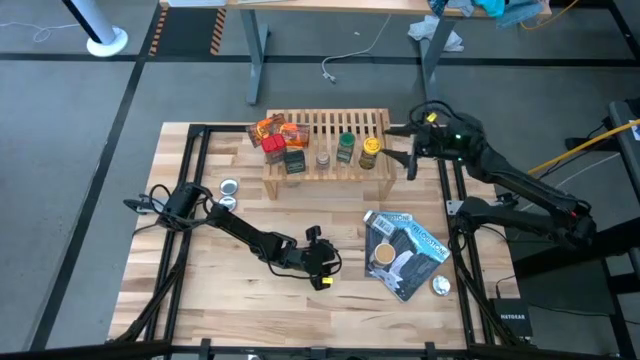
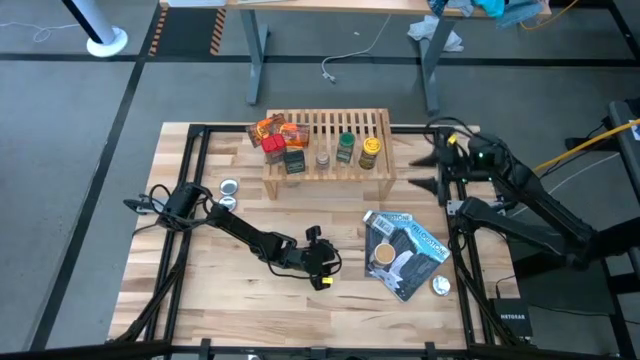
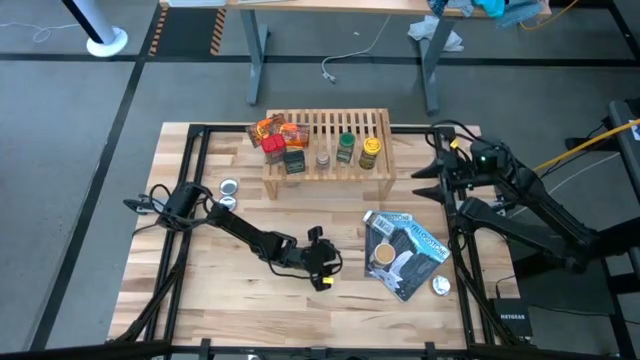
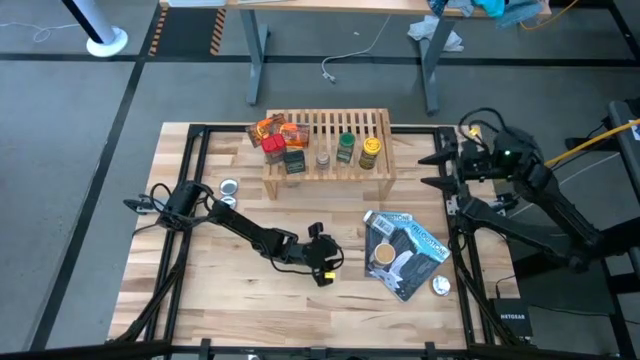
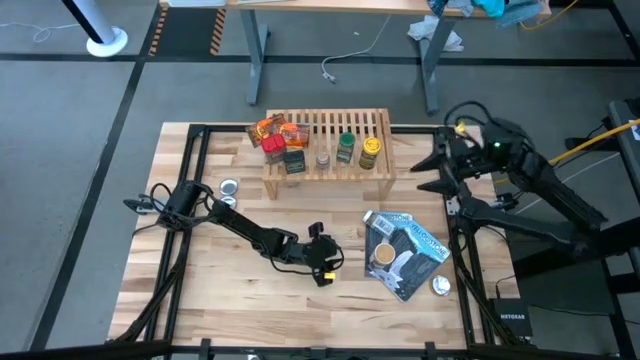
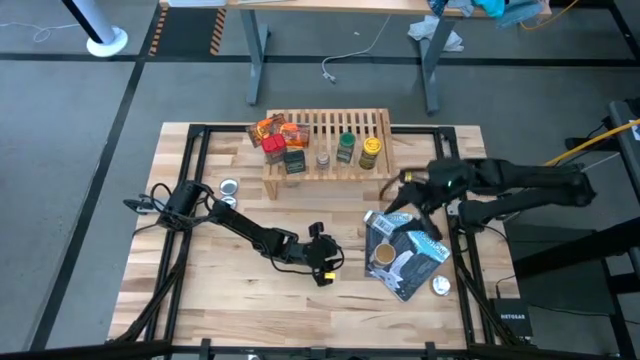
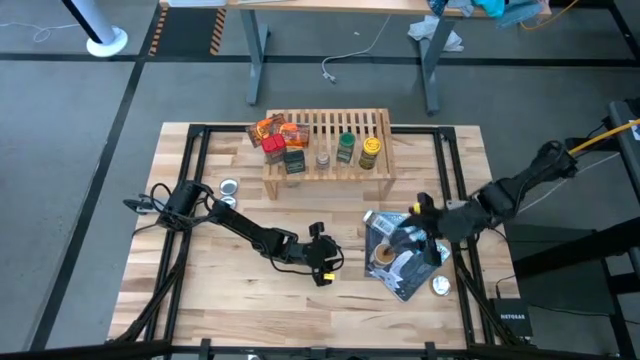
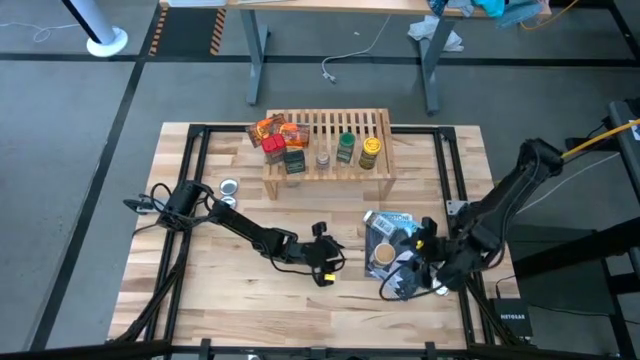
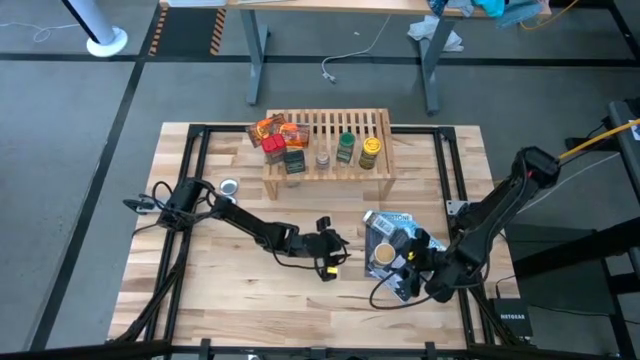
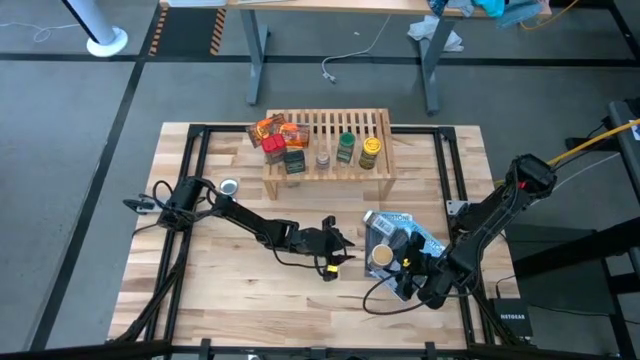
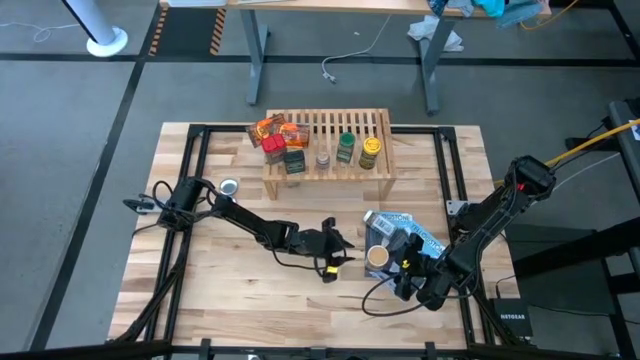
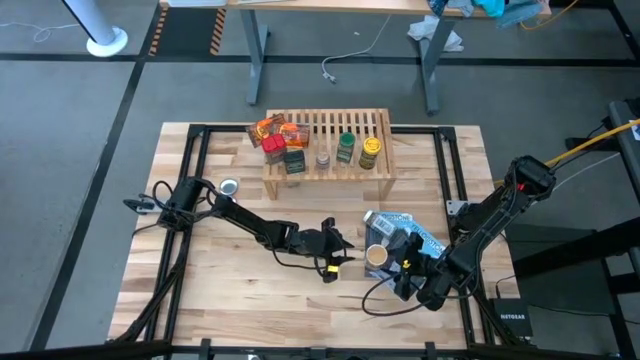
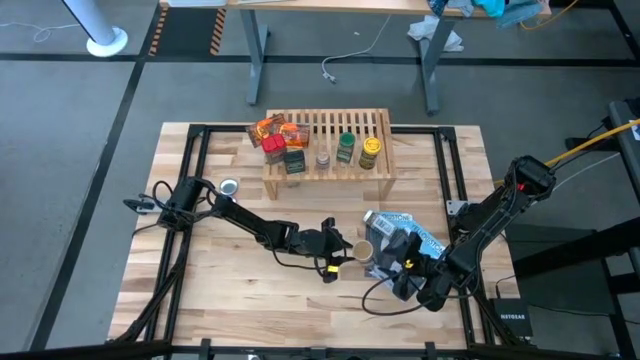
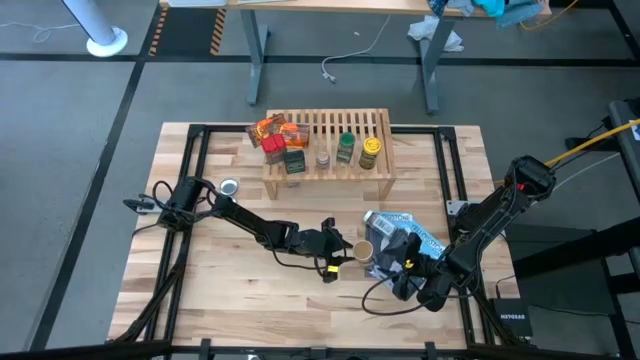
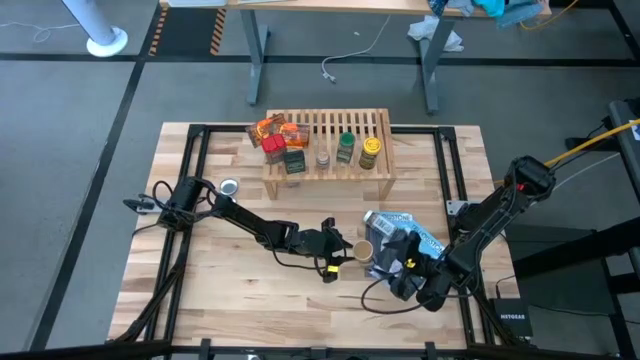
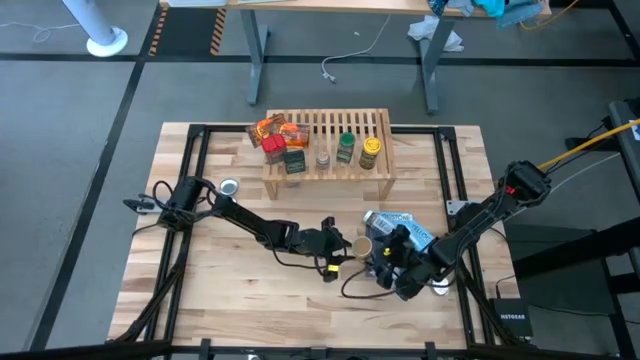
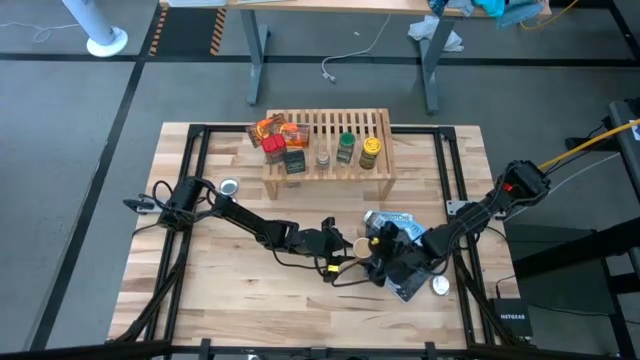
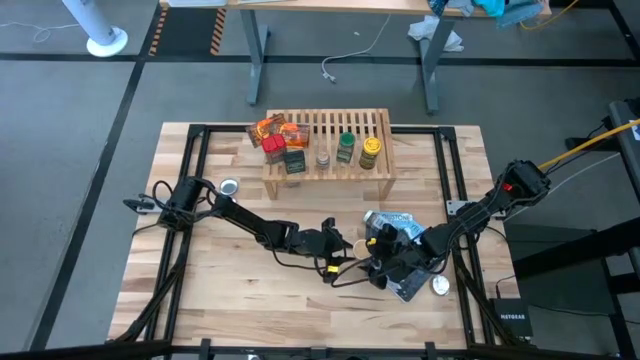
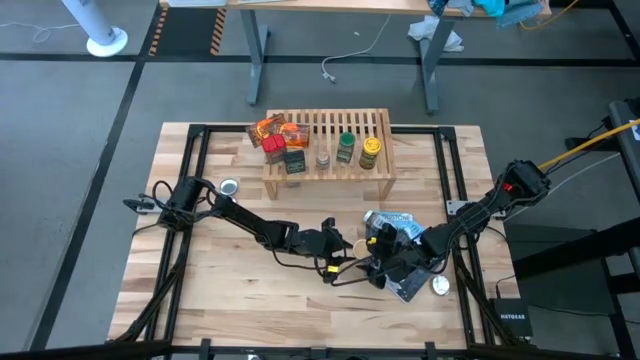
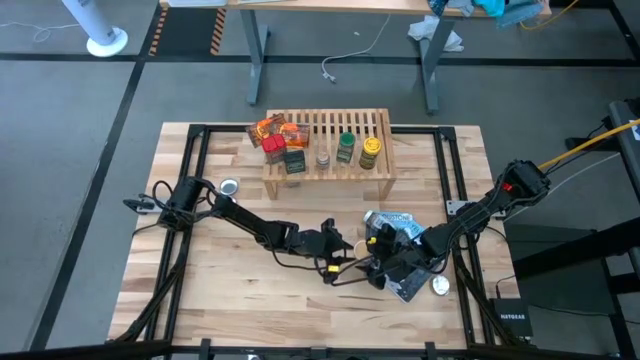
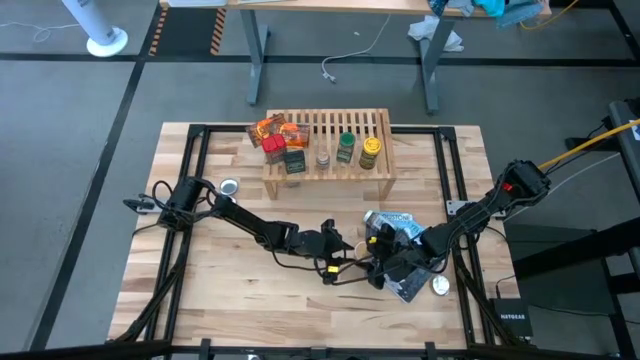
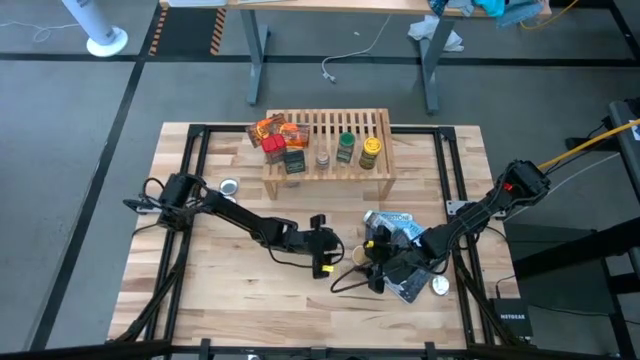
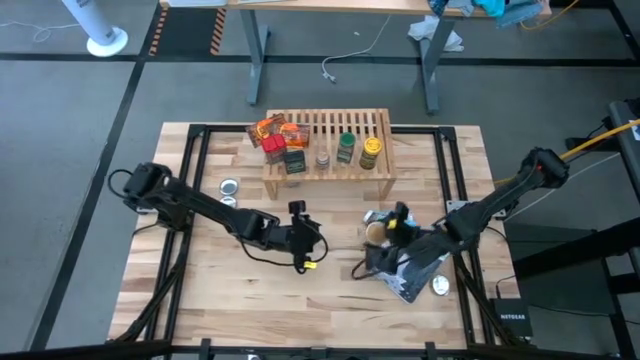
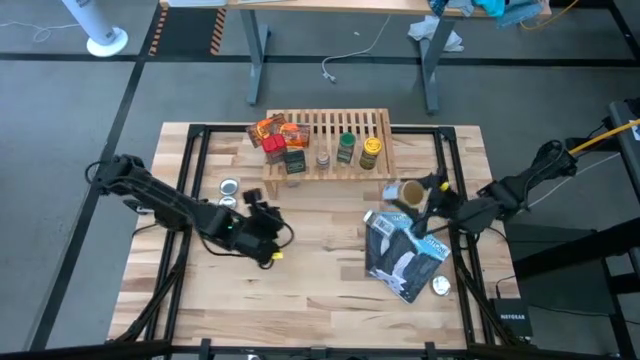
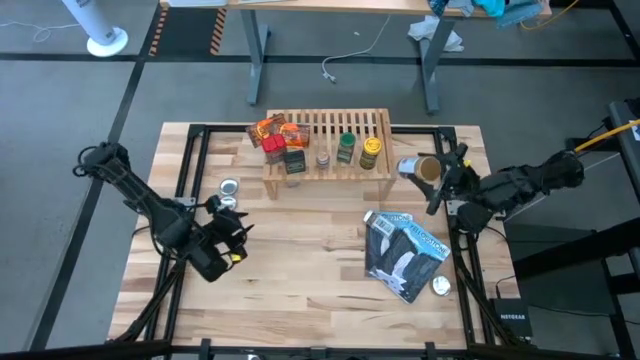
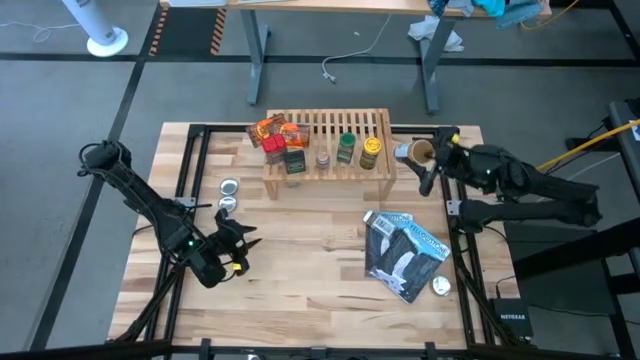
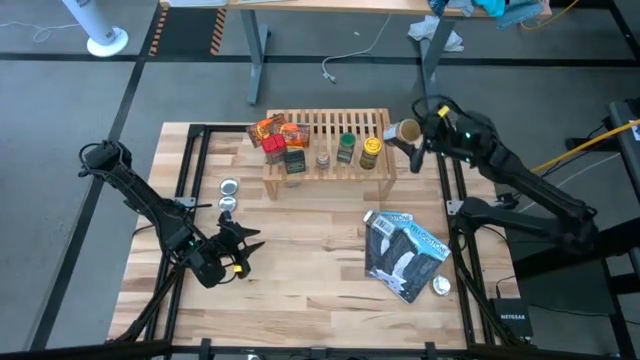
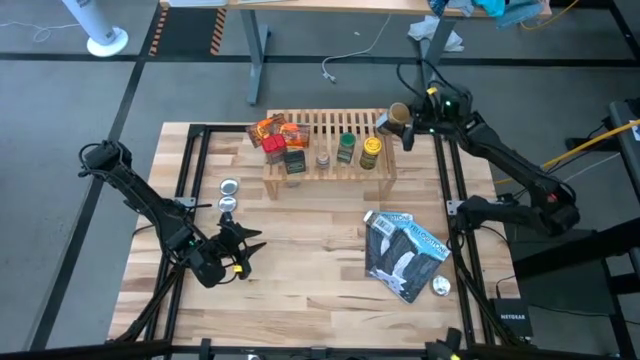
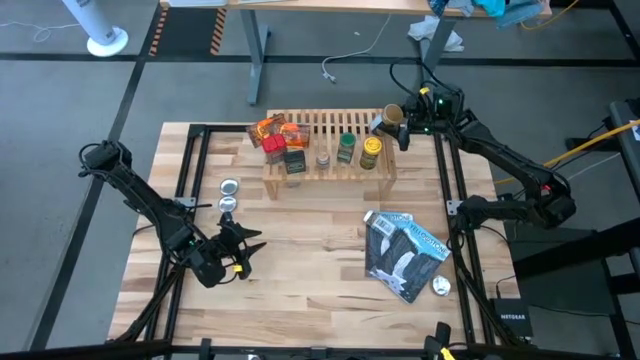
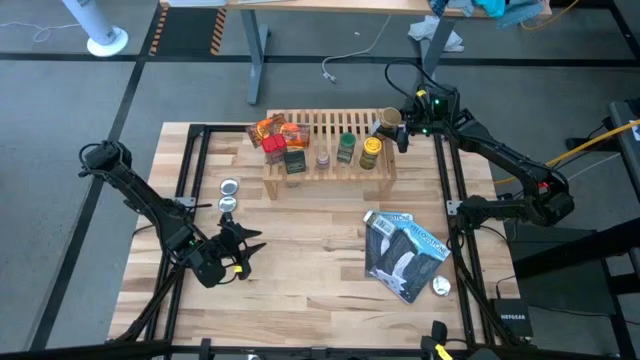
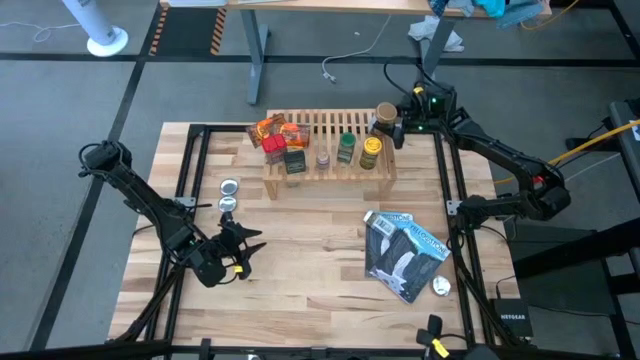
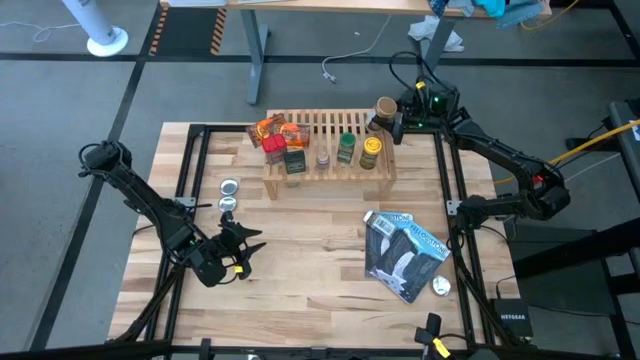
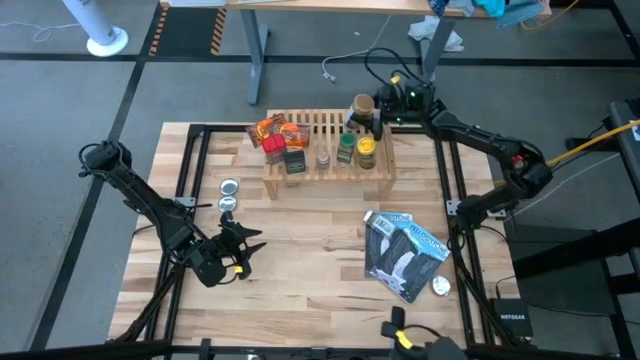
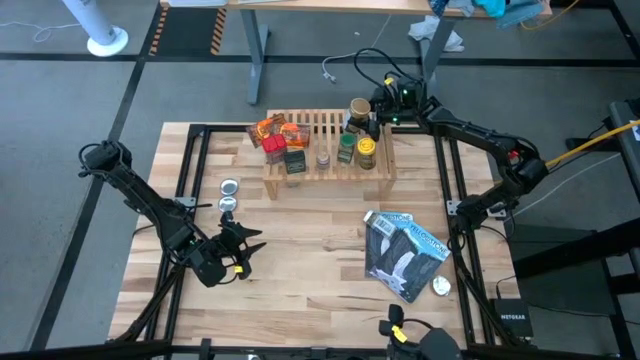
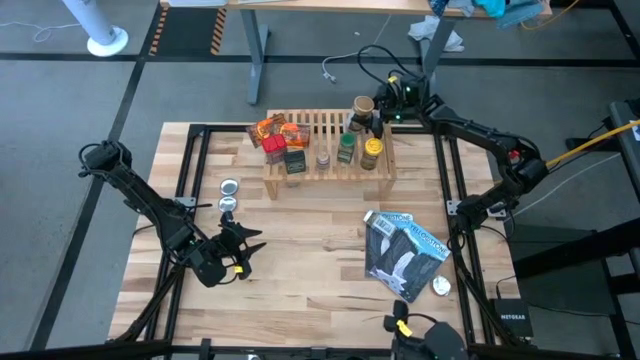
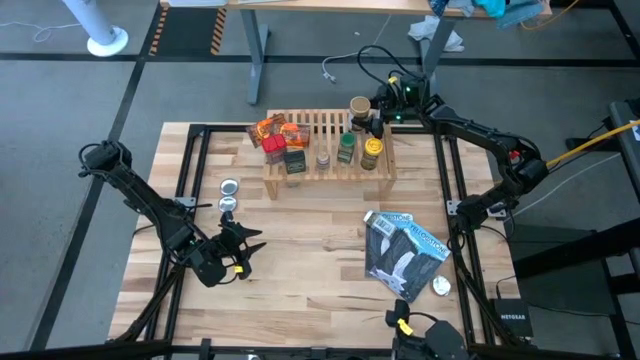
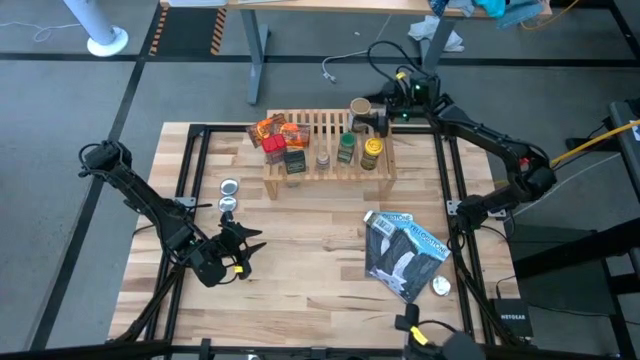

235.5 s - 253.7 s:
Task: Shelf spices
Put the gold seasoning bottle on the shelf

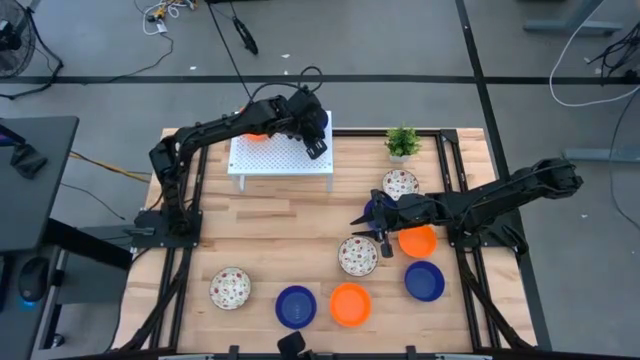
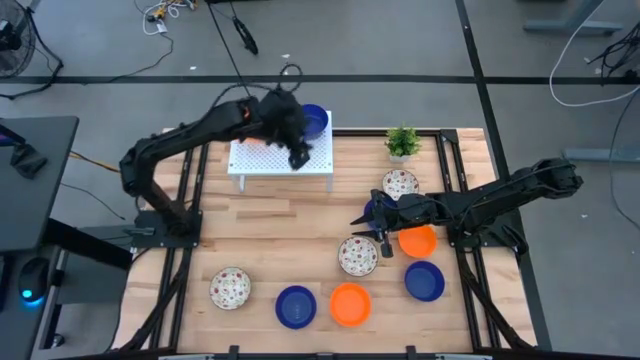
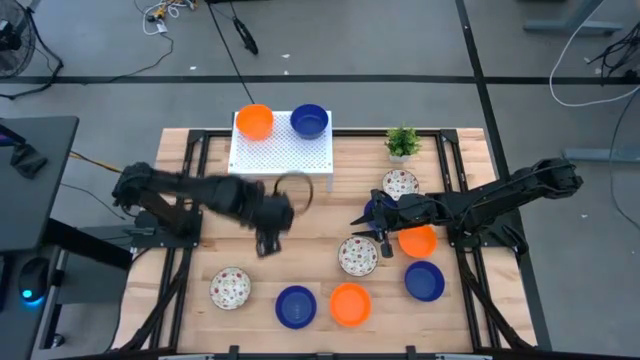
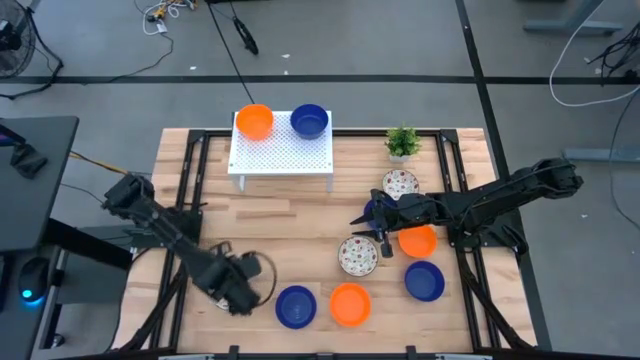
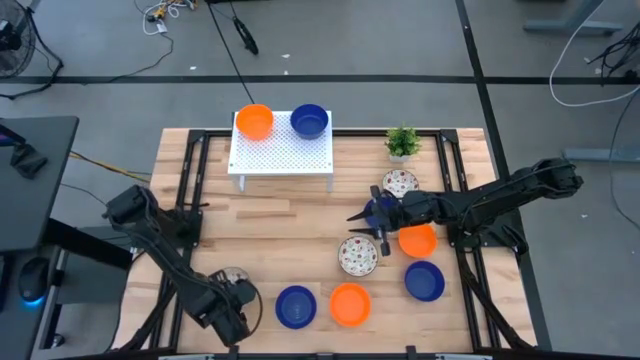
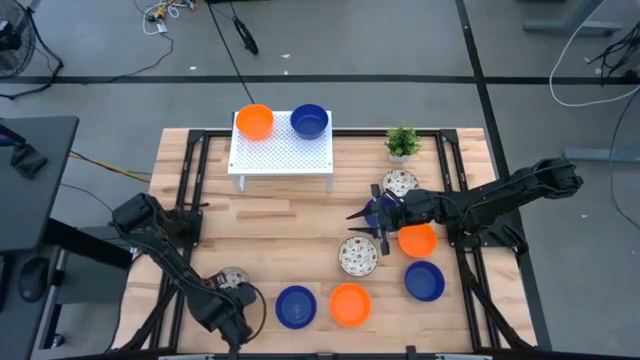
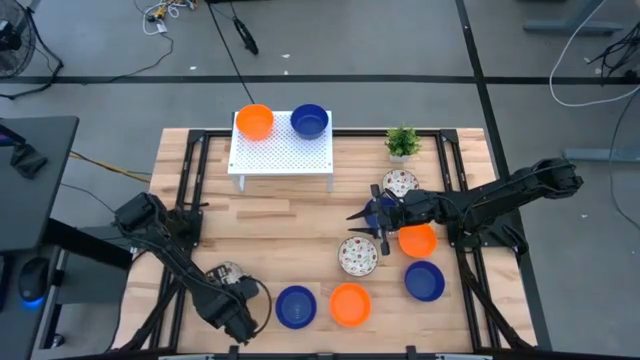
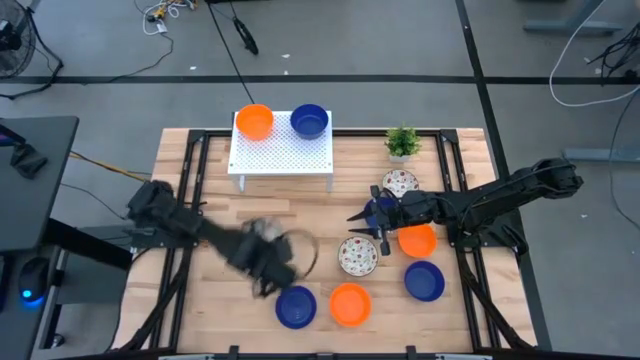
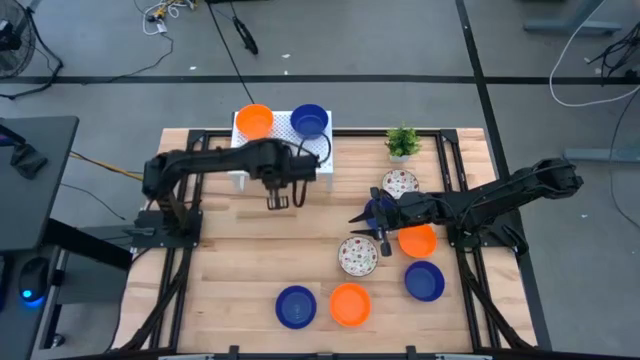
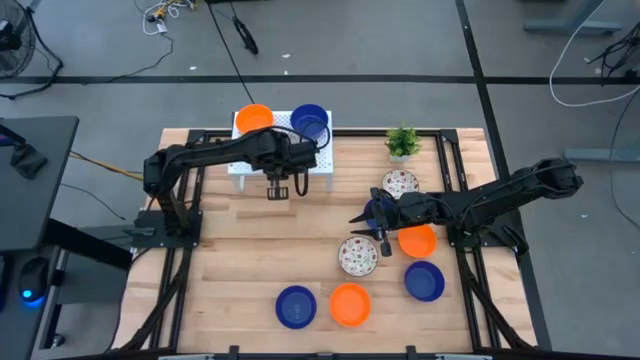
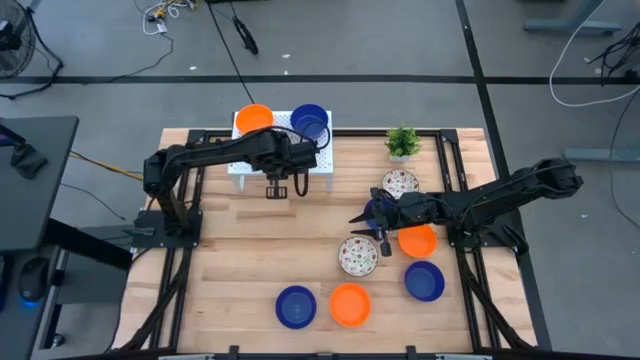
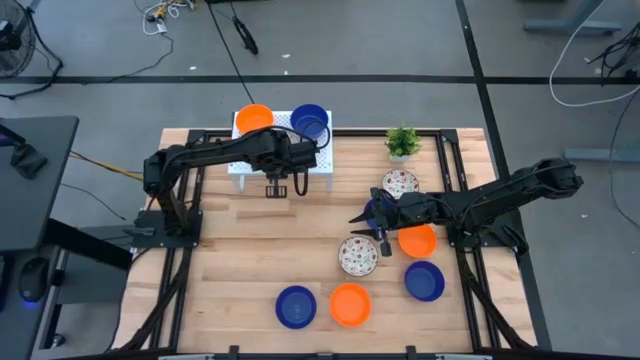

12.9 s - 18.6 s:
Task: Pick & Place Mini bowls
Put the red pattern bowl on the shelf
